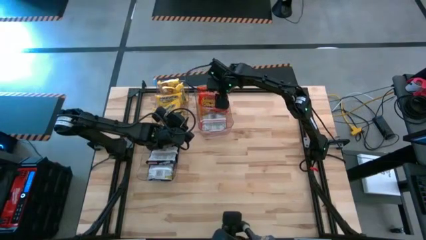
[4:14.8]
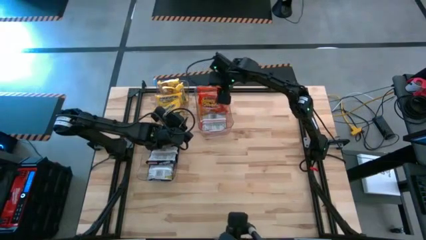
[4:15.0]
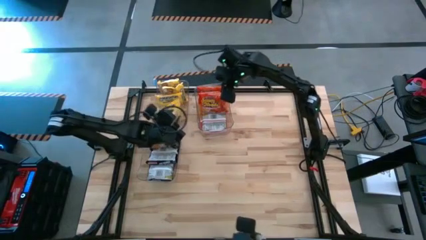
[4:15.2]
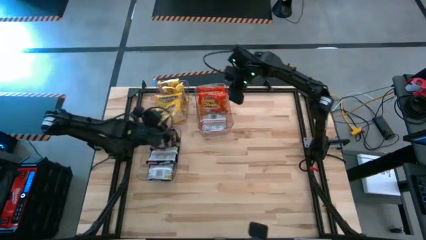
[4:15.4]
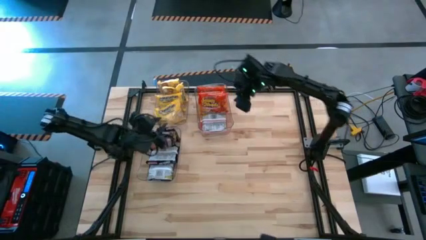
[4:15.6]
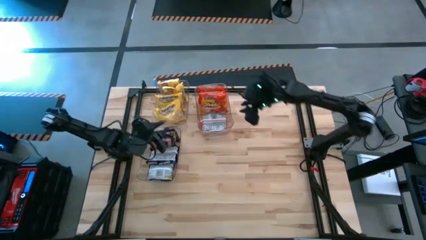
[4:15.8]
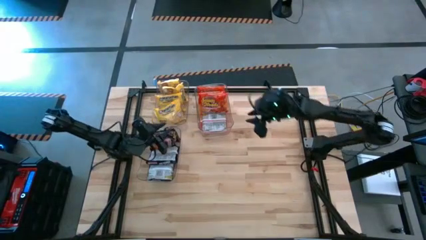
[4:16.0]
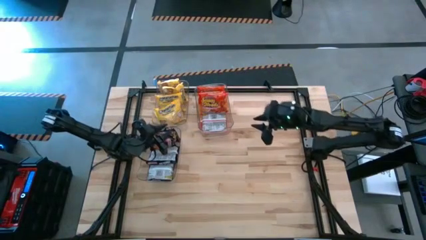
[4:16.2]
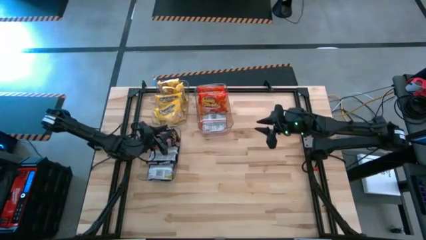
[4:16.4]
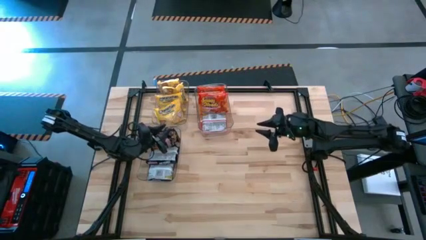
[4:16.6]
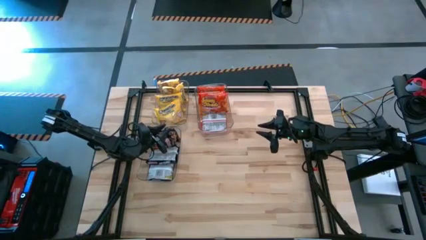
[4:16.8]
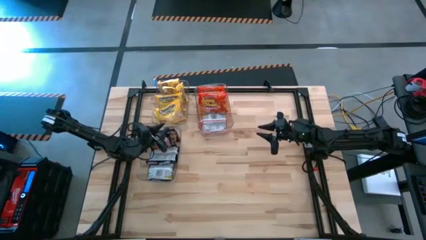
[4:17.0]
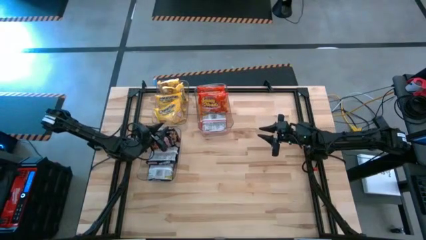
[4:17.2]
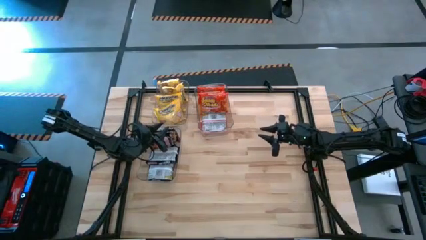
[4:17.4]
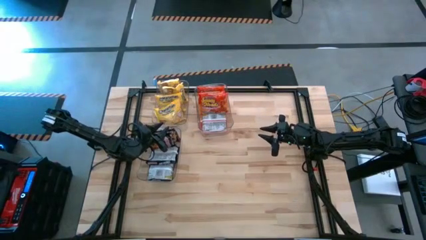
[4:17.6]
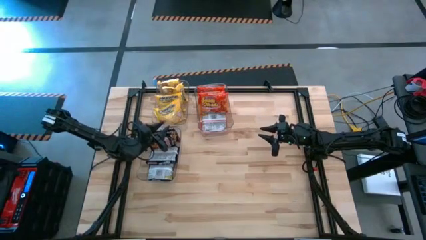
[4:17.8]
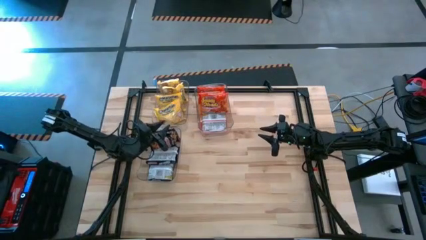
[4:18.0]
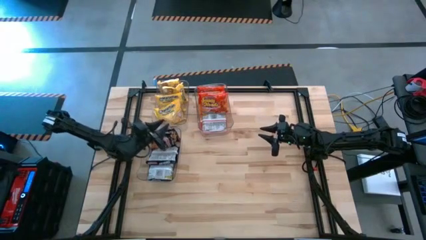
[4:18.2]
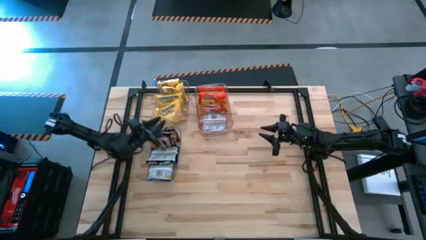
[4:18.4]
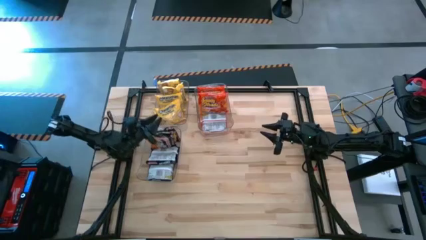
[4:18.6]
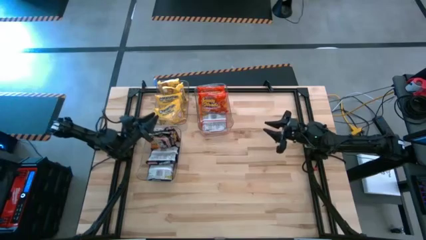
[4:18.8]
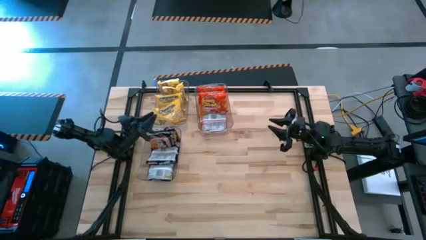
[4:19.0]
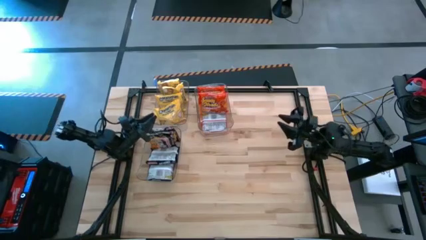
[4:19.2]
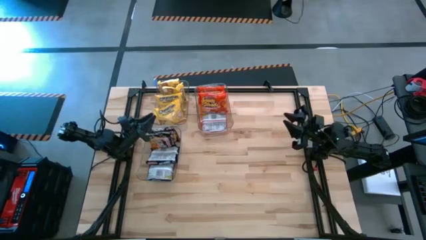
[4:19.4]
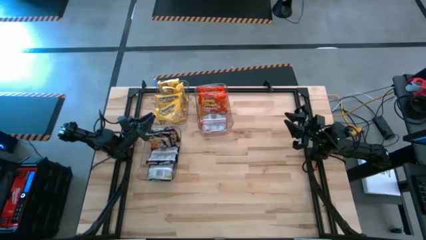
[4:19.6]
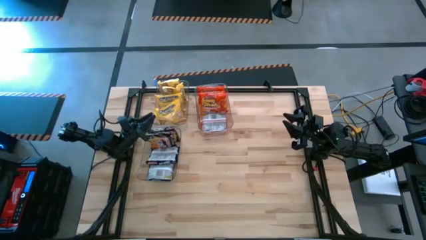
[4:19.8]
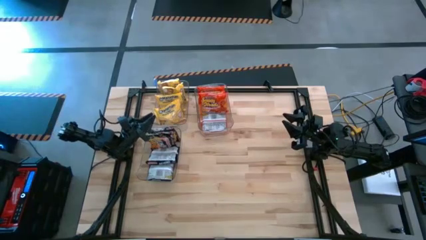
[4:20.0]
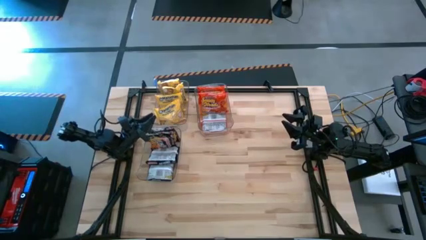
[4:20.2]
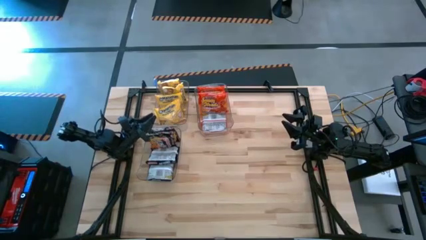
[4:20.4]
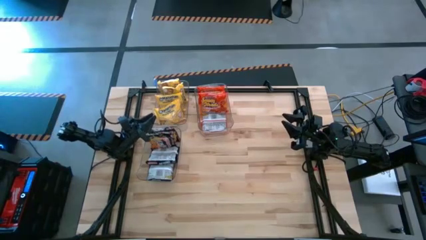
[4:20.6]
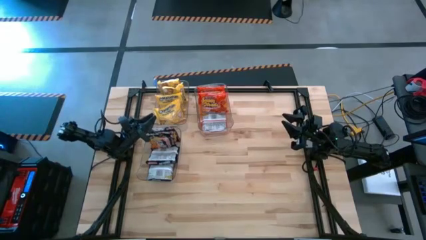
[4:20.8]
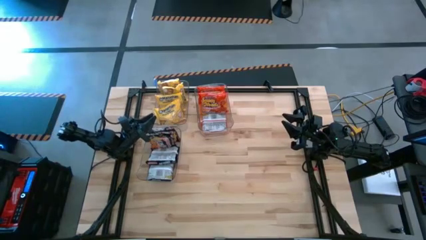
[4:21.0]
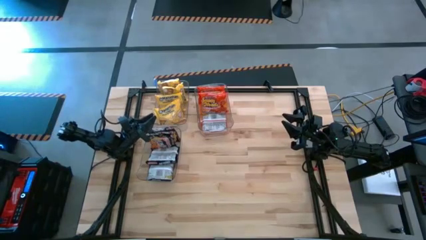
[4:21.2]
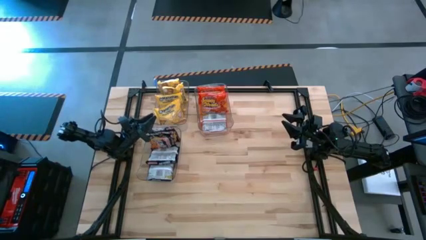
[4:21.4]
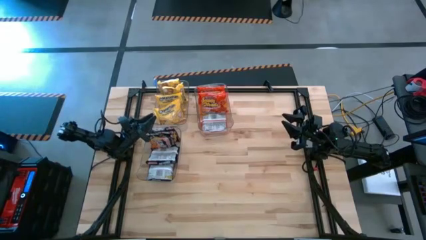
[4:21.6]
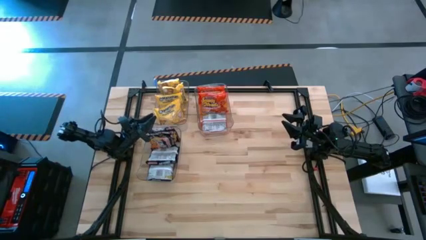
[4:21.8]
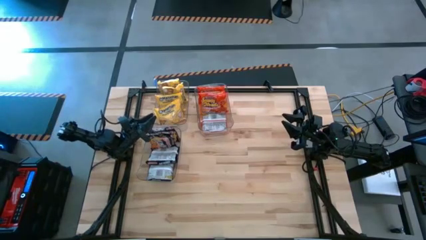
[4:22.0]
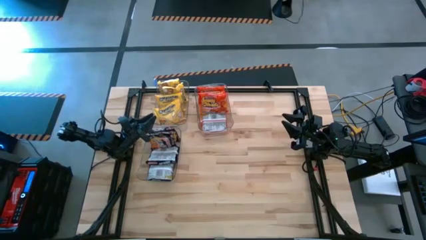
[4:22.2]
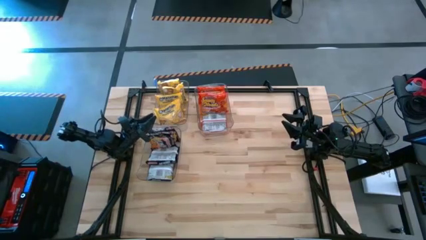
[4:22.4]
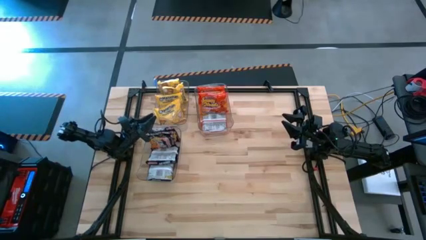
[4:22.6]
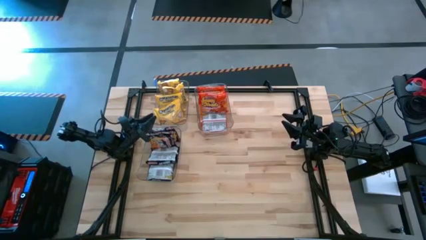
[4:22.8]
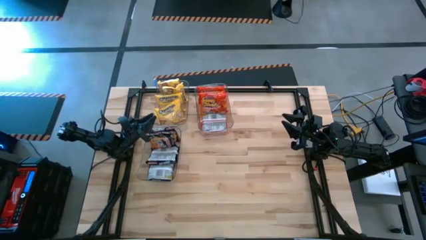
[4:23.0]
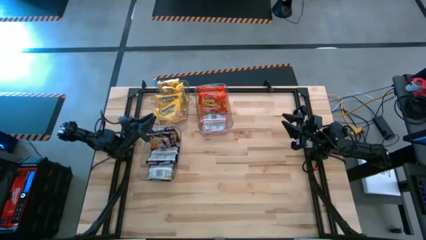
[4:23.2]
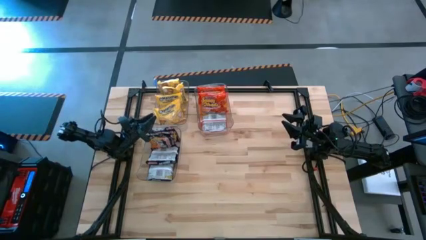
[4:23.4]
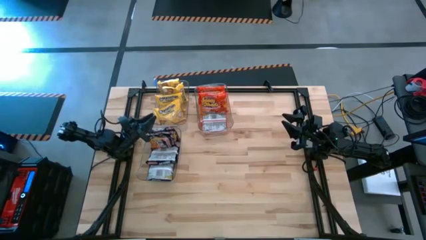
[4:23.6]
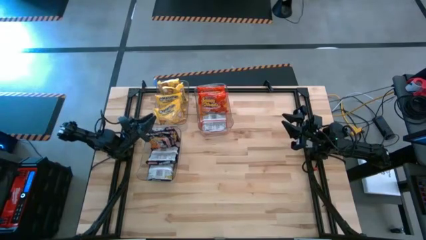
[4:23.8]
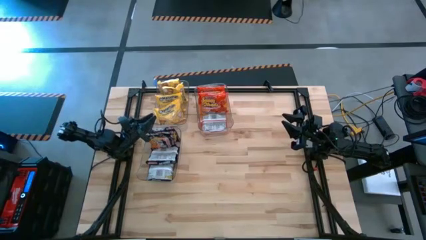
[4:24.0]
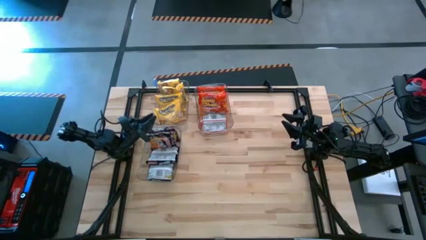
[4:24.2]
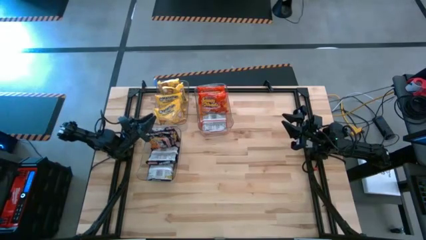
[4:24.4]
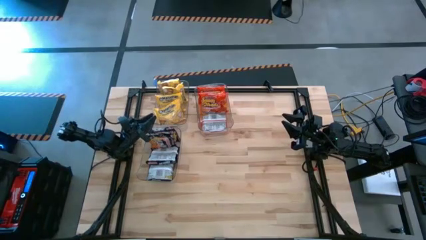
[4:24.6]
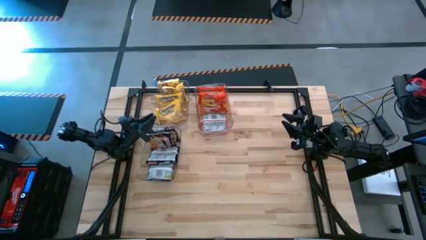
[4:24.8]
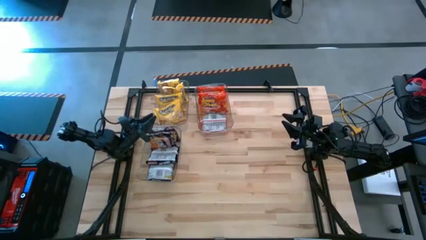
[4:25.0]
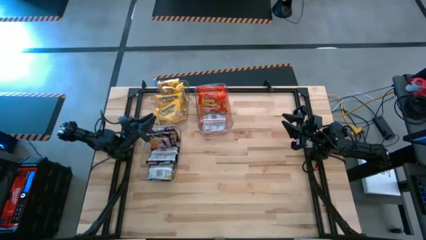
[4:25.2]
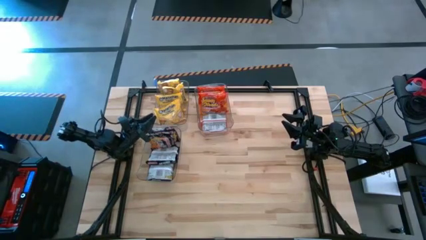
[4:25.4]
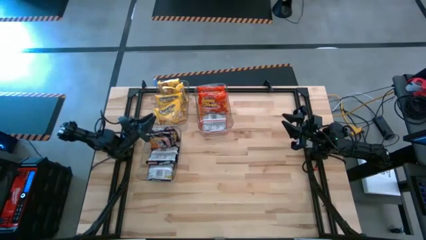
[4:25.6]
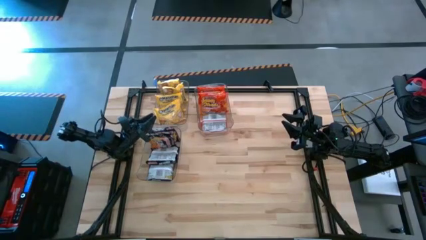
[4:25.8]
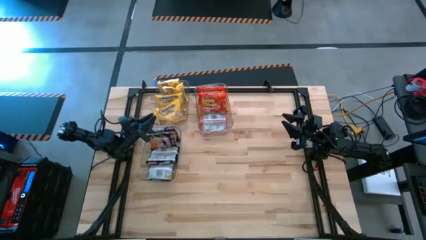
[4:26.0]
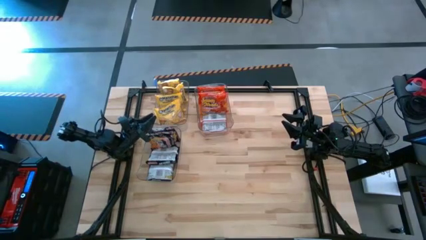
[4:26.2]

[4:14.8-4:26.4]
Task: Sort Maruchan noodles
Return to Home Position

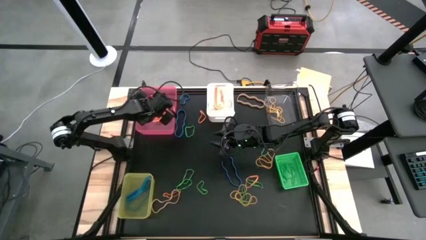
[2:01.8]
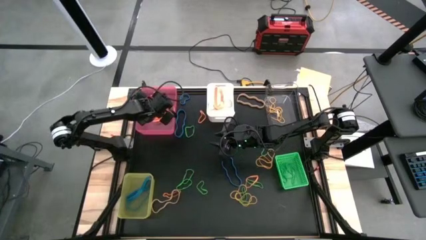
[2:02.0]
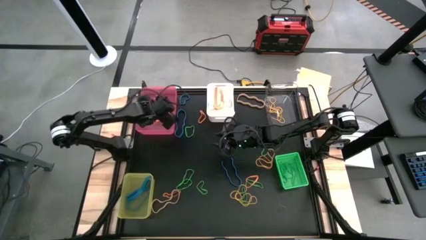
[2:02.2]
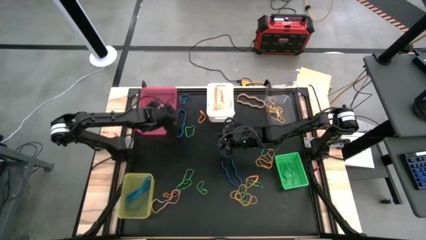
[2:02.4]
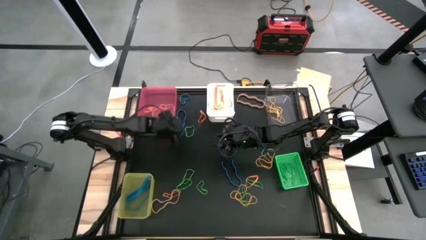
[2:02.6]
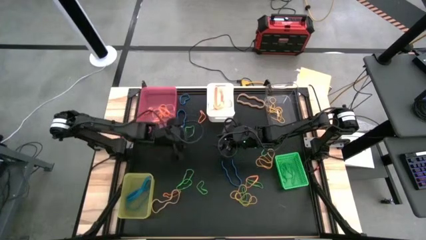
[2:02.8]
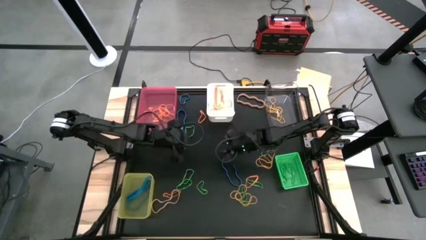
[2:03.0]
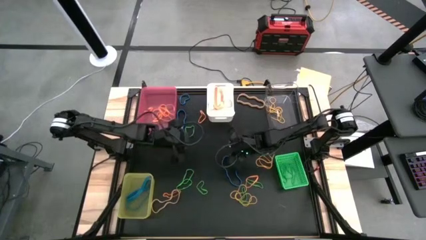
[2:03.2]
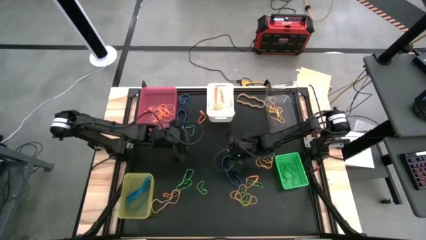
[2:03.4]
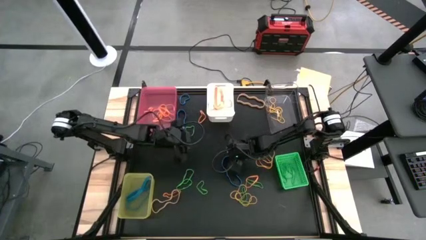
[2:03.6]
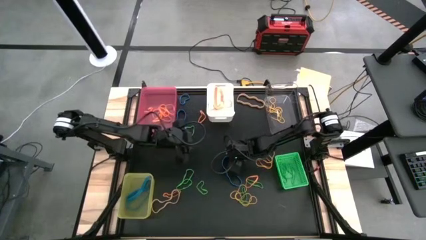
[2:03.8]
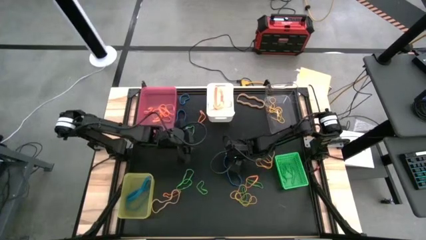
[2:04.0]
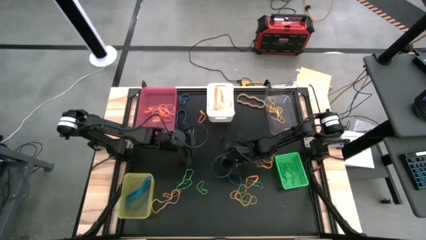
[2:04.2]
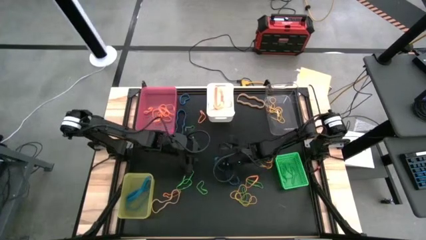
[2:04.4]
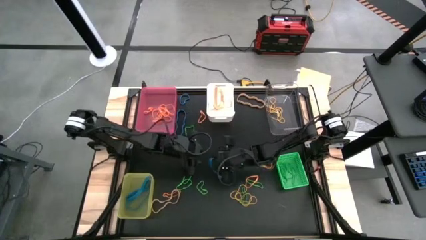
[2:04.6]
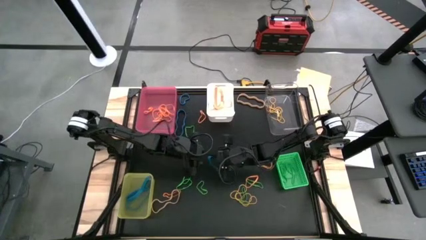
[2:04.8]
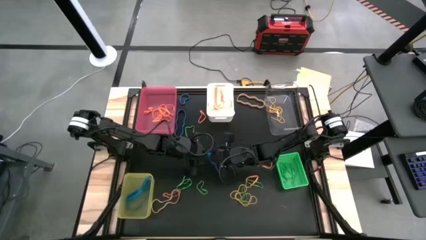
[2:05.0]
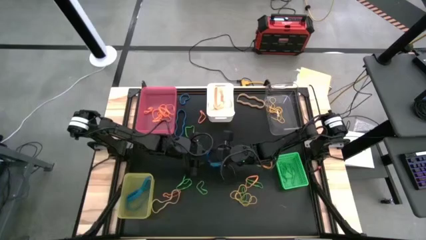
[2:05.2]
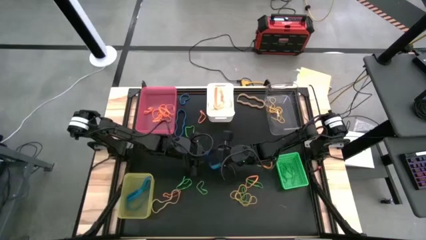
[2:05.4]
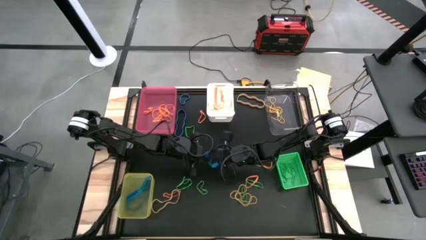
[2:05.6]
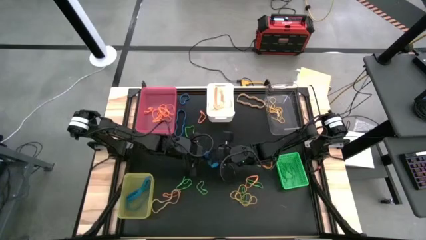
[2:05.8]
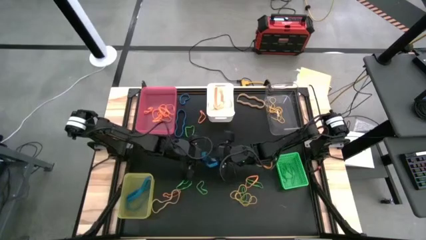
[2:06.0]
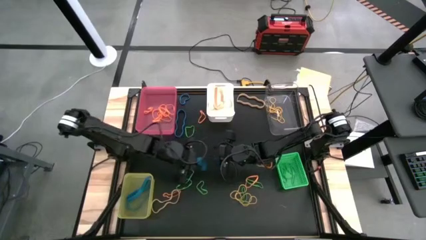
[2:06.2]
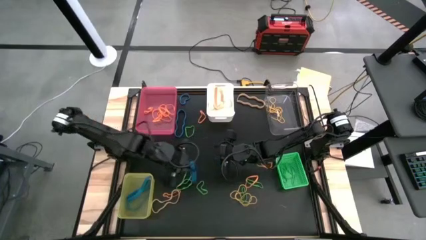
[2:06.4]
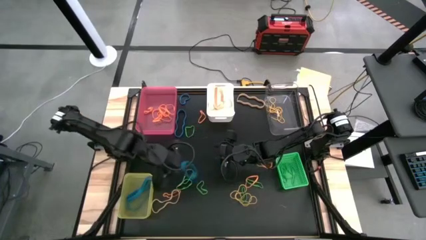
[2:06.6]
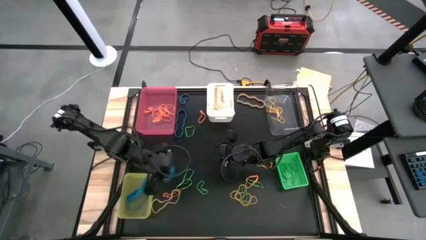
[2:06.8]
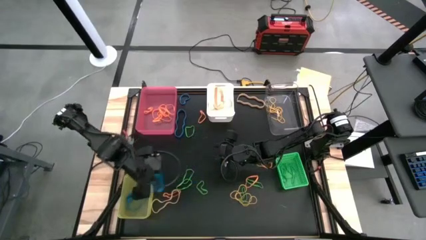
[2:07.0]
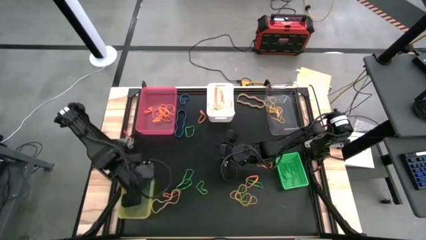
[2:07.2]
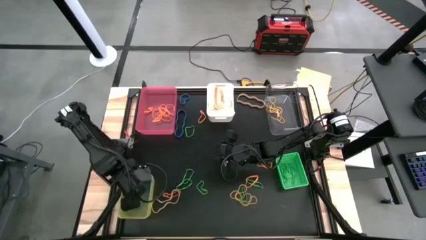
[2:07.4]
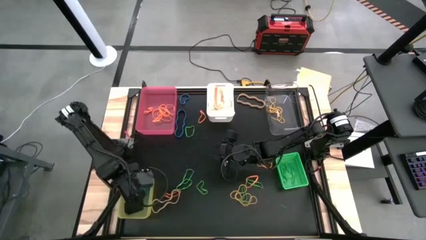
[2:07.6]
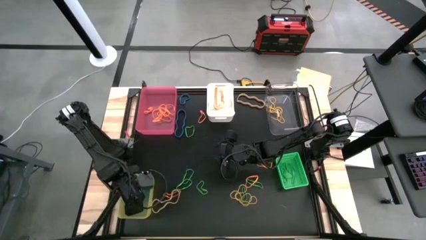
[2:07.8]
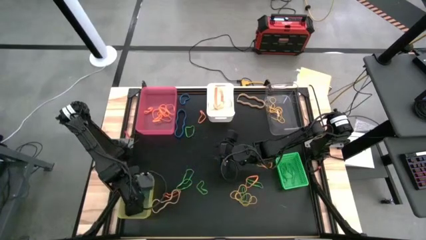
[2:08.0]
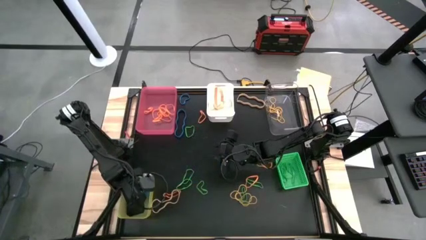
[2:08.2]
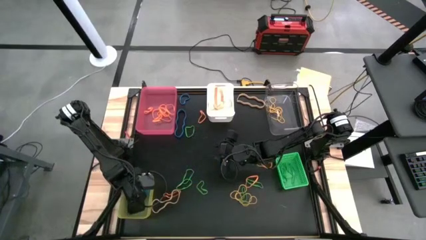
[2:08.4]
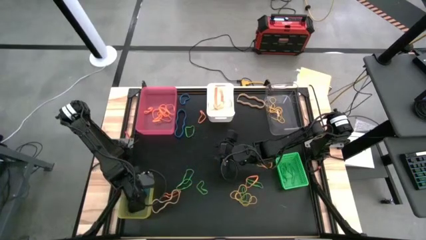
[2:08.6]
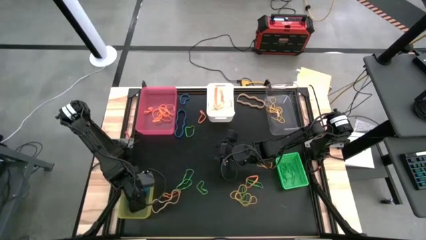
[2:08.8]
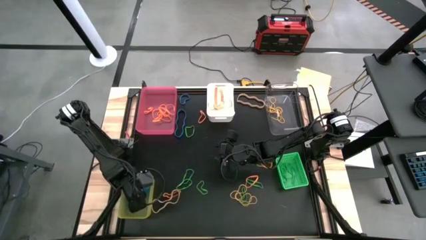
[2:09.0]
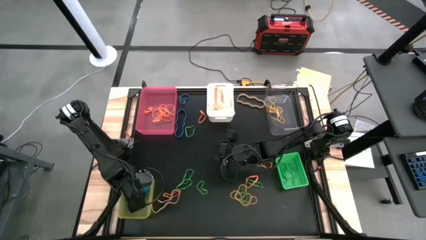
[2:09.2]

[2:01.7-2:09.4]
Task: Sort rubber bands into baskets
Put the blue rubber band into the yellow bin
